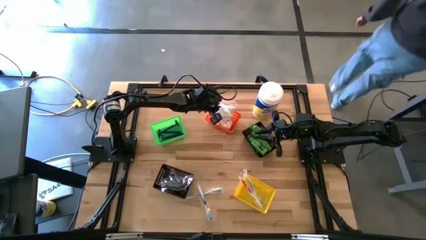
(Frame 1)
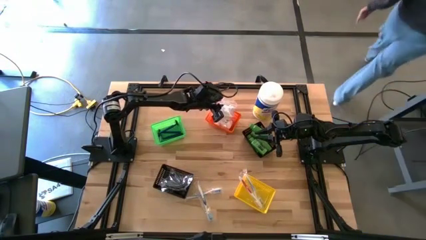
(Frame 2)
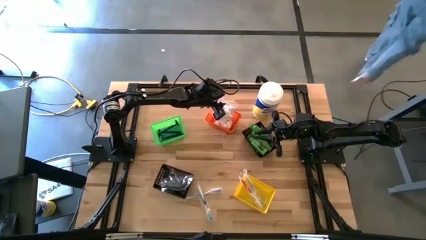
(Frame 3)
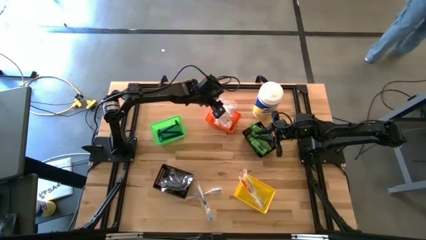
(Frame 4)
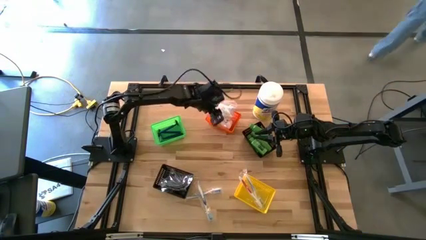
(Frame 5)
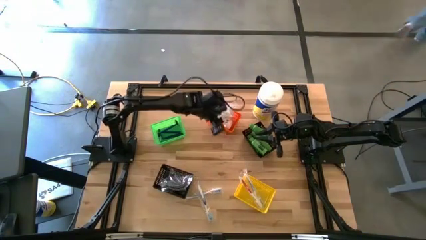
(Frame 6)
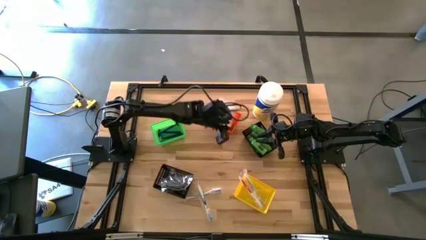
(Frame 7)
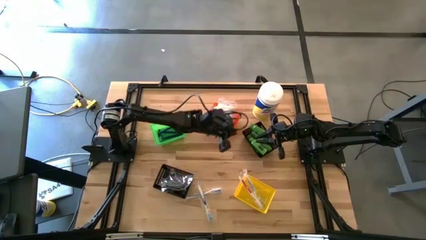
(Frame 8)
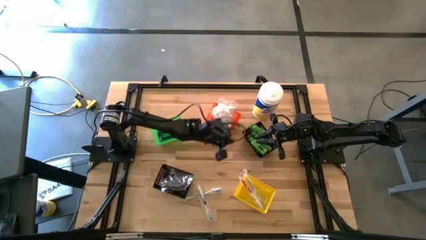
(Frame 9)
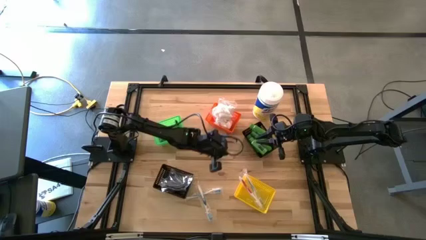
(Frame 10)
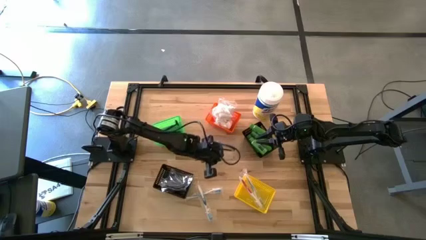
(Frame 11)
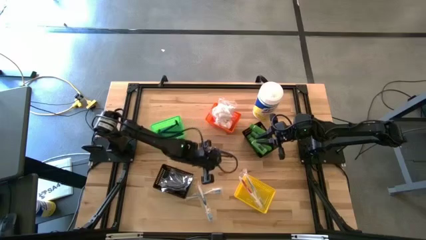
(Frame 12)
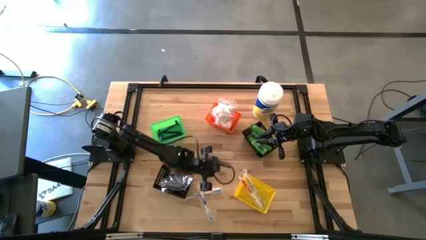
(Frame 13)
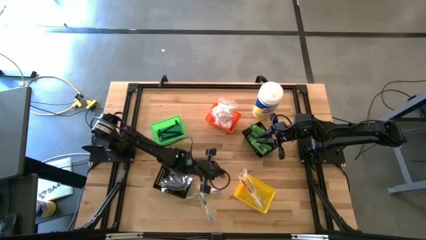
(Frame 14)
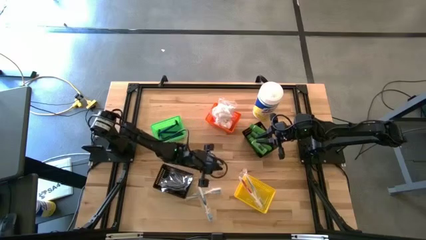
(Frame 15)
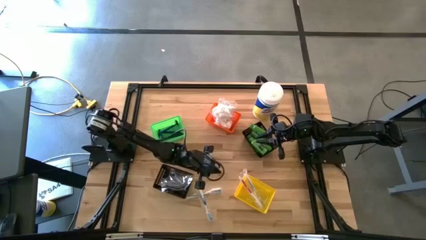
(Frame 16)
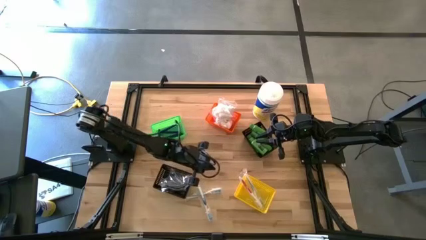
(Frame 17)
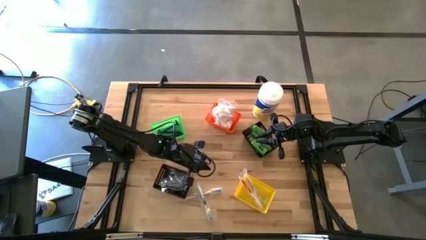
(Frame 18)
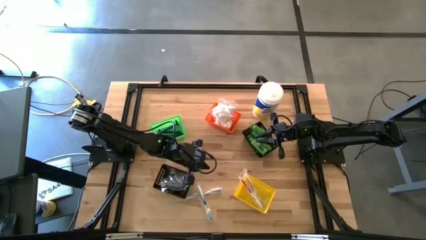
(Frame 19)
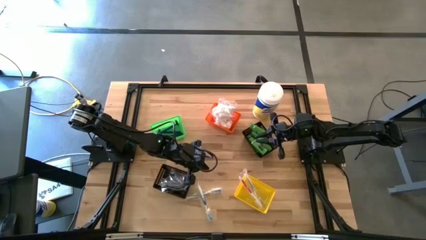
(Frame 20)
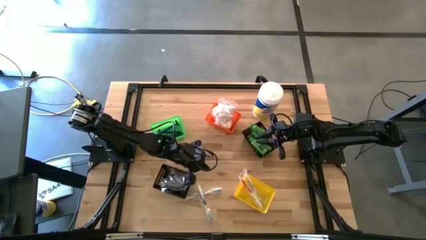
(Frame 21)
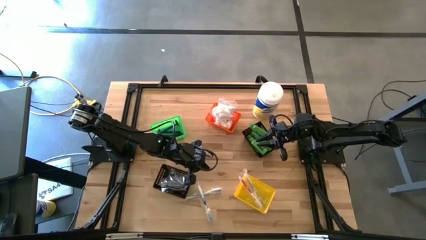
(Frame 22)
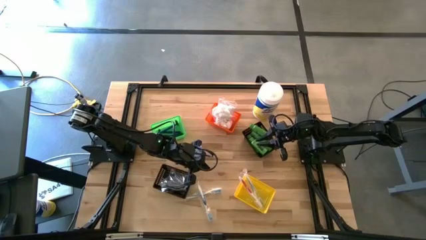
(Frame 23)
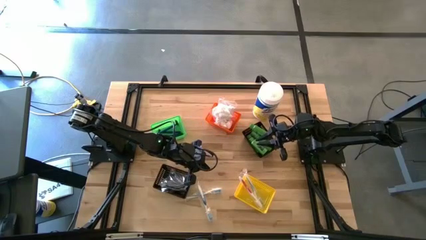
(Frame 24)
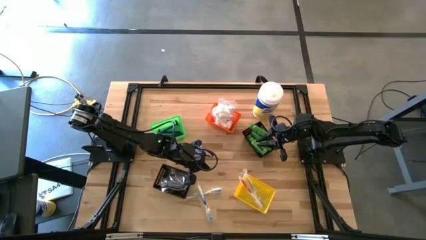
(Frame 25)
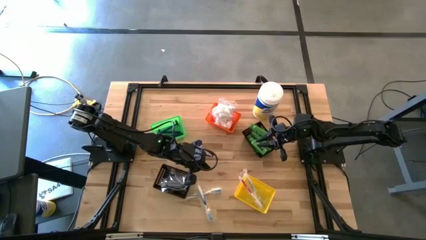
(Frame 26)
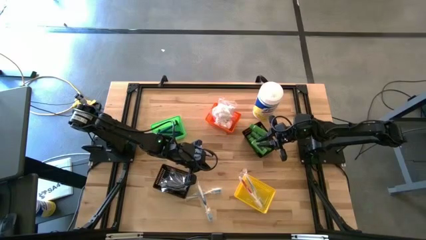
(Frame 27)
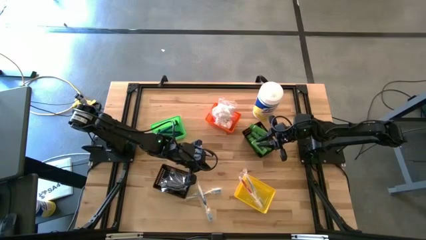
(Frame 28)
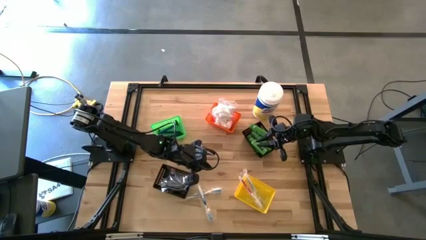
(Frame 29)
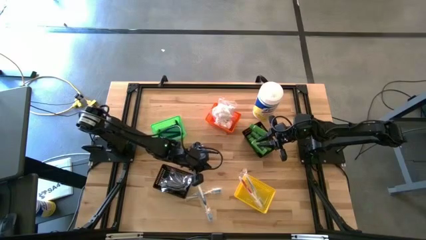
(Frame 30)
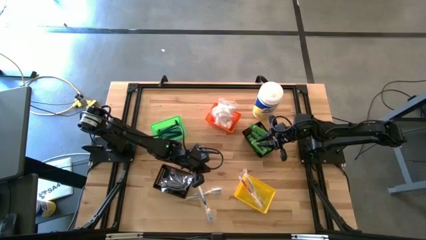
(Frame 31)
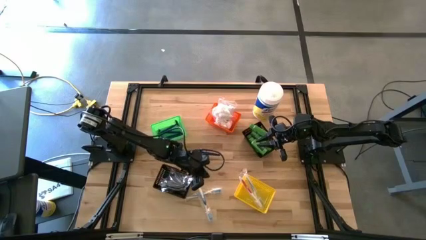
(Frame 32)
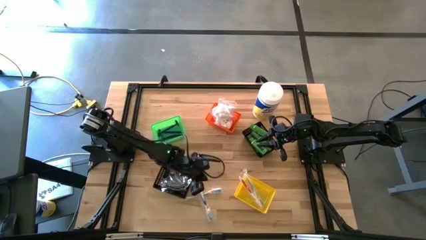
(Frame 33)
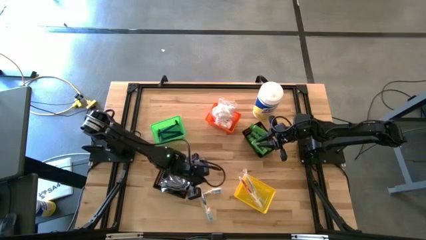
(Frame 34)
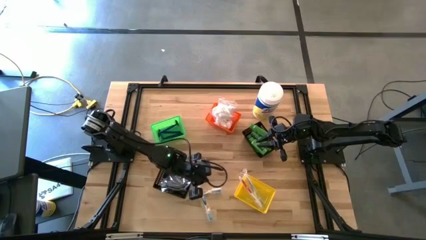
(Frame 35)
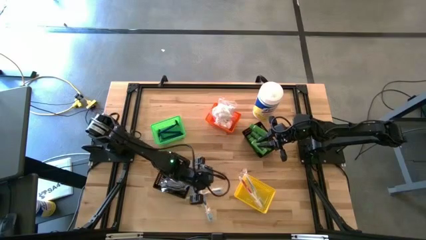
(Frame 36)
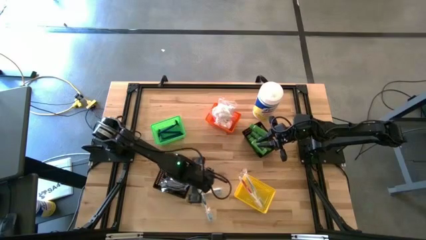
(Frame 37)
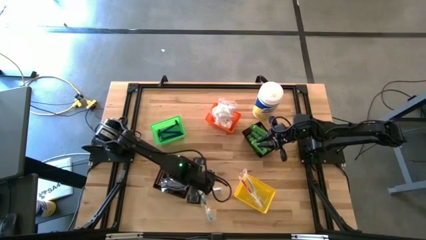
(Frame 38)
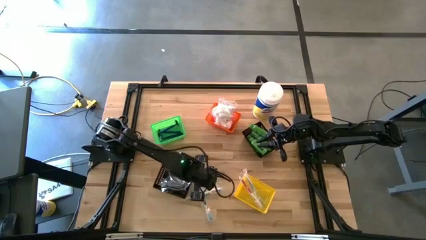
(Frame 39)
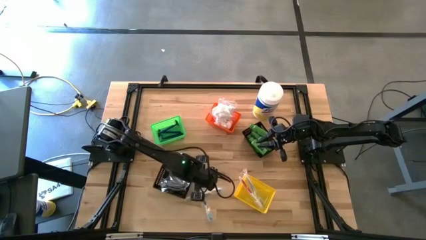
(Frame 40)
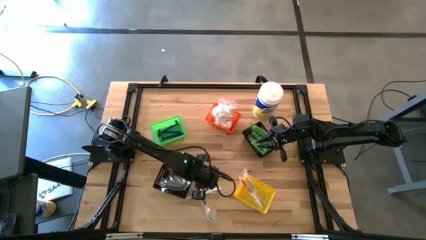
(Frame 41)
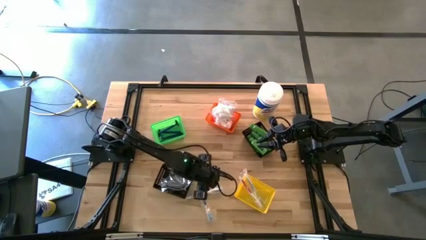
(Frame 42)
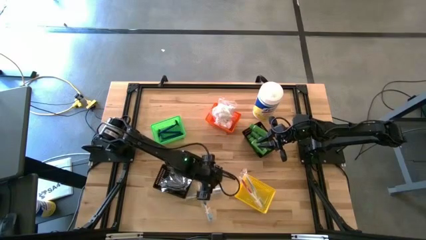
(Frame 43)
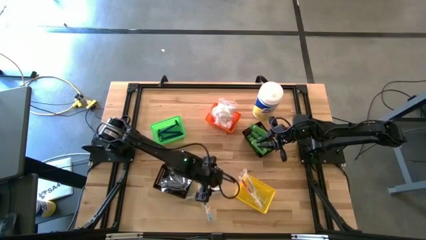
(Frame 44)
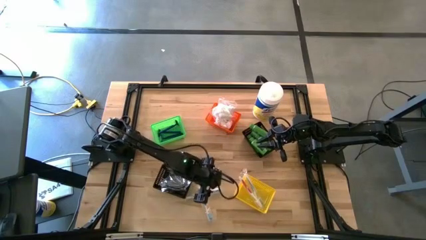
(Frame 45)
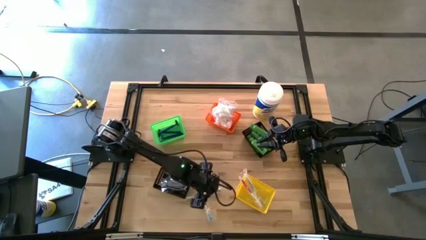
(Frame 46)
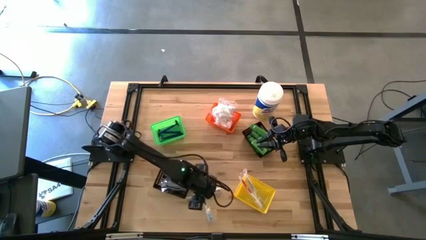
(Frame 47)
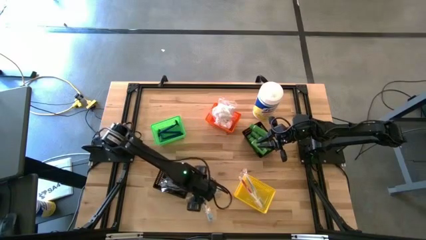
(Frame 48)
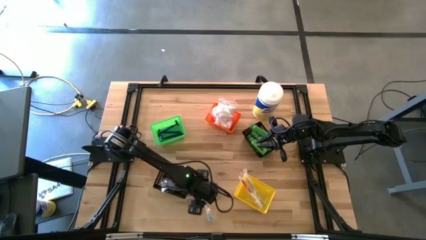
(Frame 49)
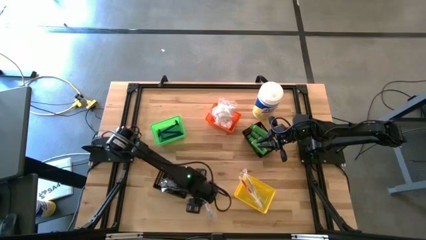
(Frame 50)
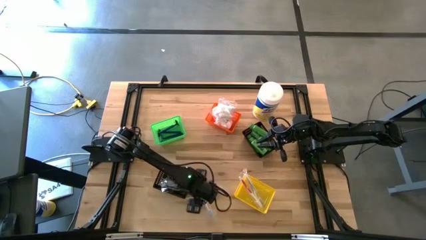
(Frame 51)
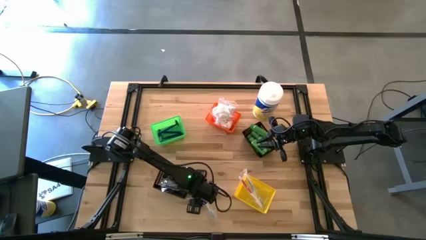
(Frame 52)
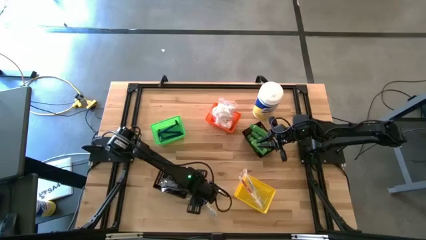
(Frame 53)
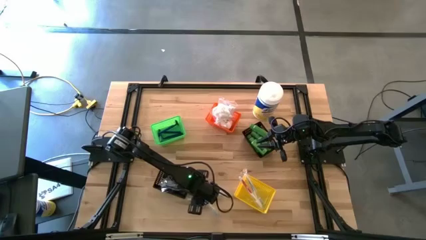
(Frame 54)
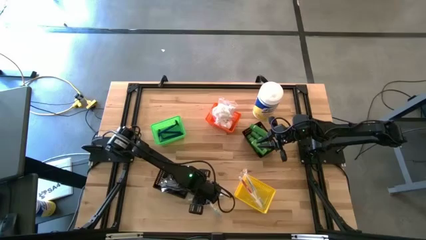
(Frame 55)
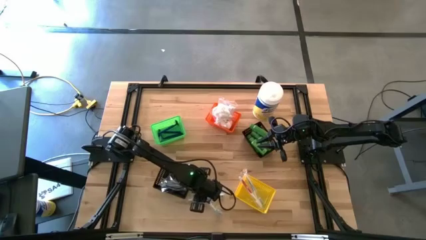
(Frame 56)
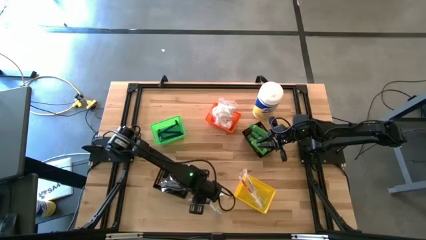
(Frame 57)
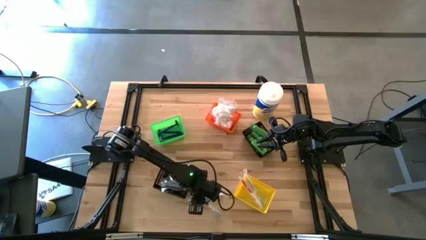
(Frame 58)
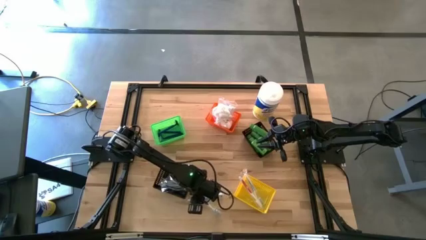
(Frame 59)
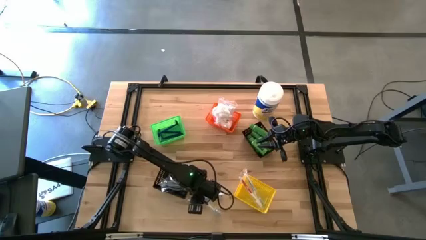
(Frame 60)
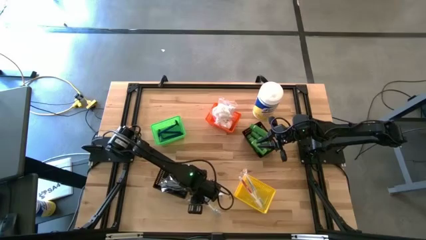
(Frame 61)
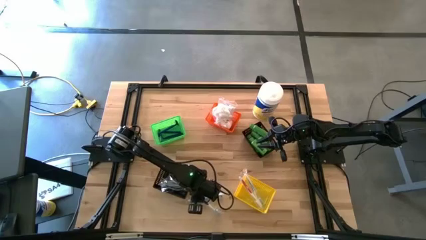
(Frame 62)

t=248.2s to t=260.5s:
Task: Pick & Place Travel size toiletries
Put the dark blue toothbrush into the yellow bin
